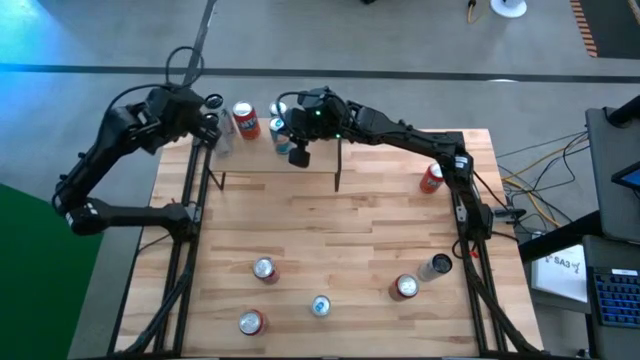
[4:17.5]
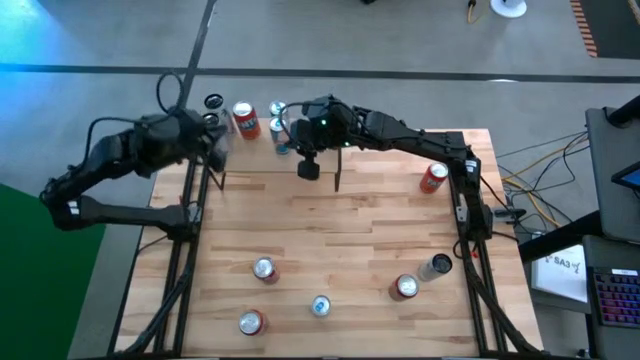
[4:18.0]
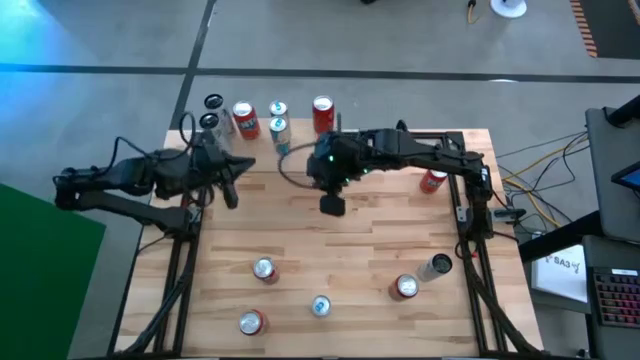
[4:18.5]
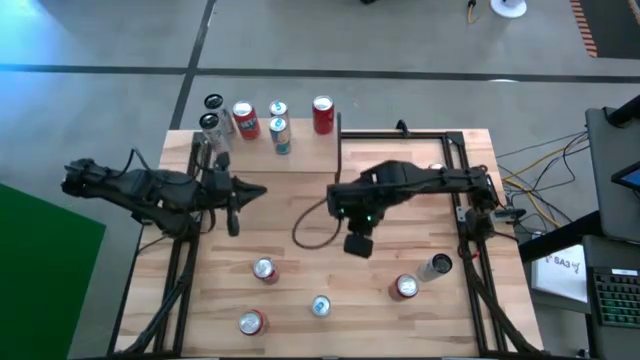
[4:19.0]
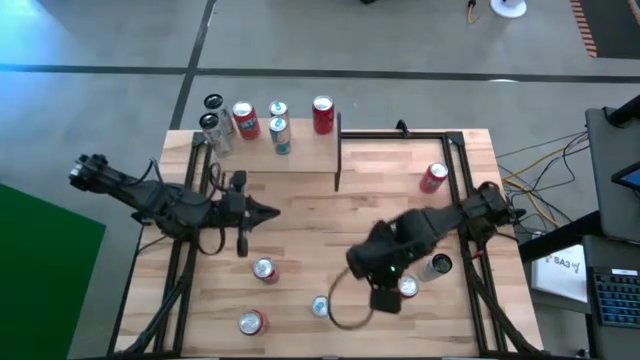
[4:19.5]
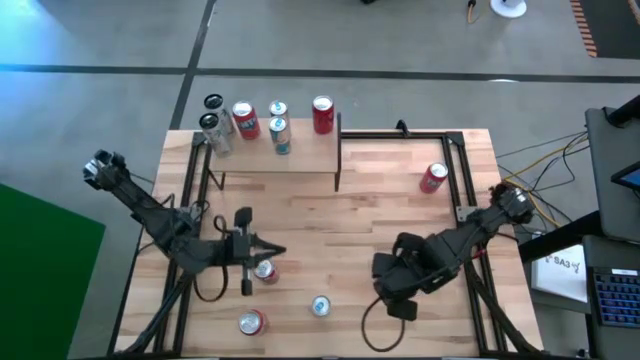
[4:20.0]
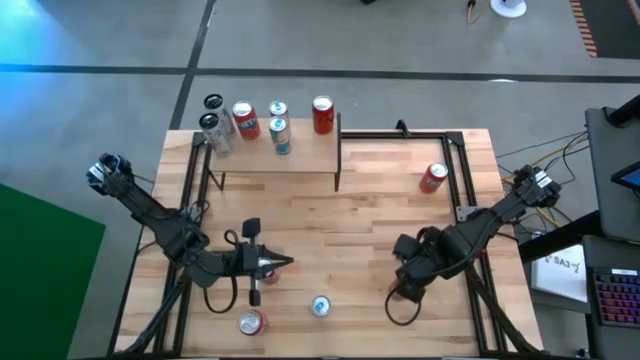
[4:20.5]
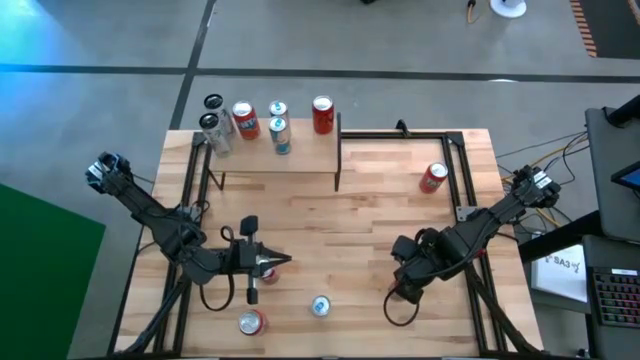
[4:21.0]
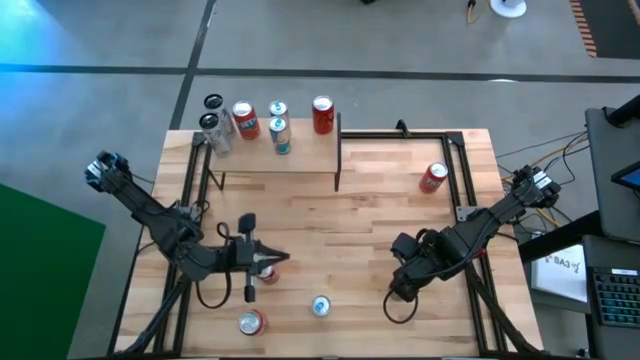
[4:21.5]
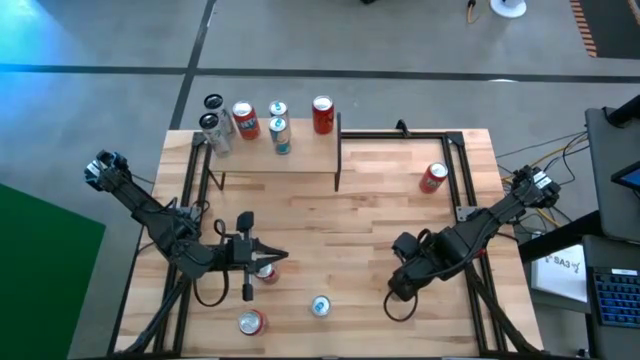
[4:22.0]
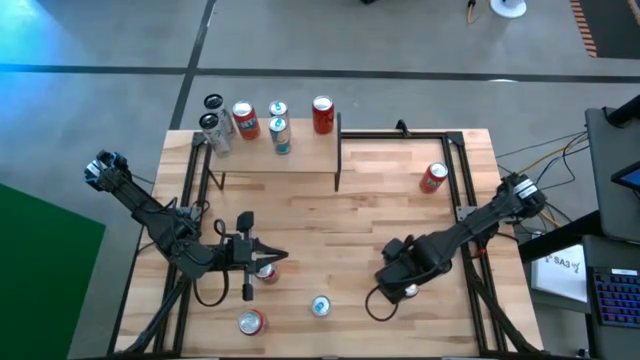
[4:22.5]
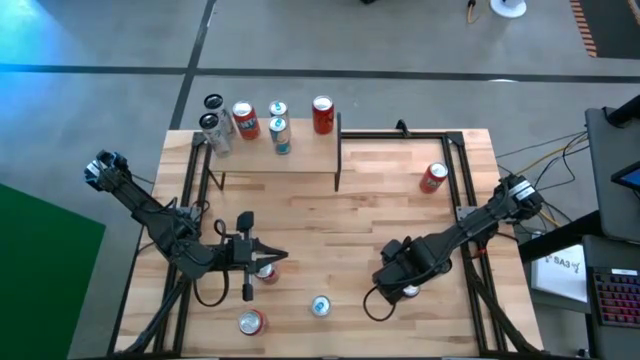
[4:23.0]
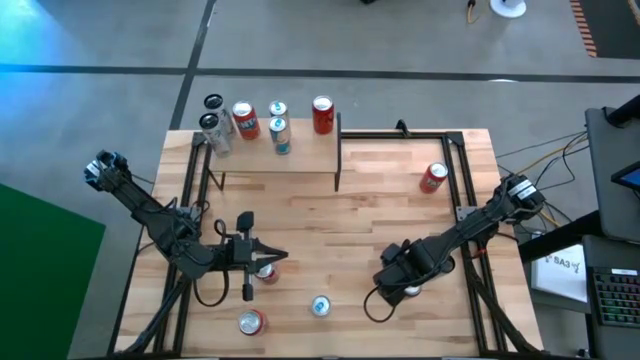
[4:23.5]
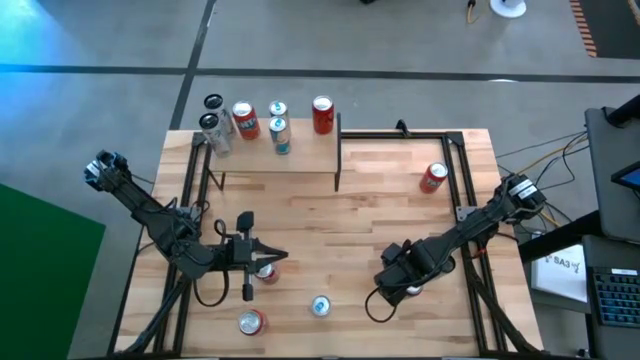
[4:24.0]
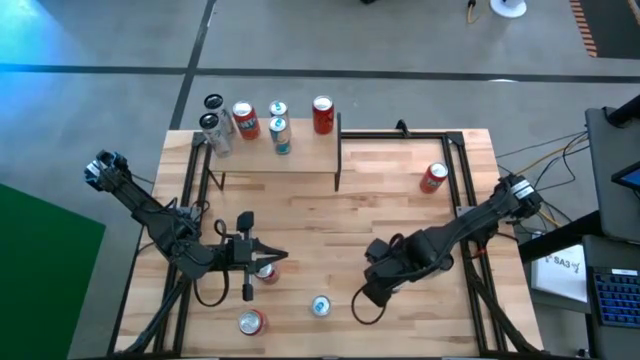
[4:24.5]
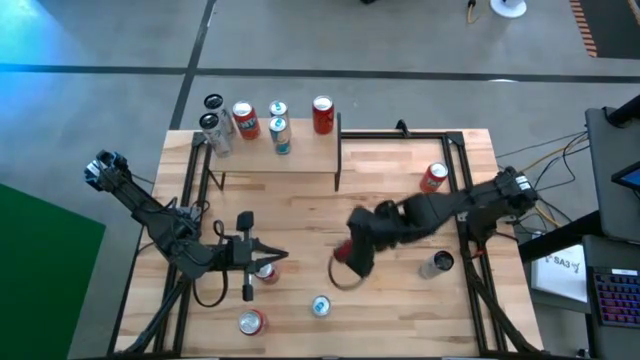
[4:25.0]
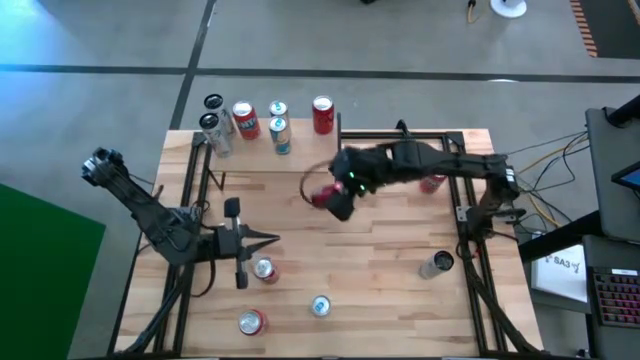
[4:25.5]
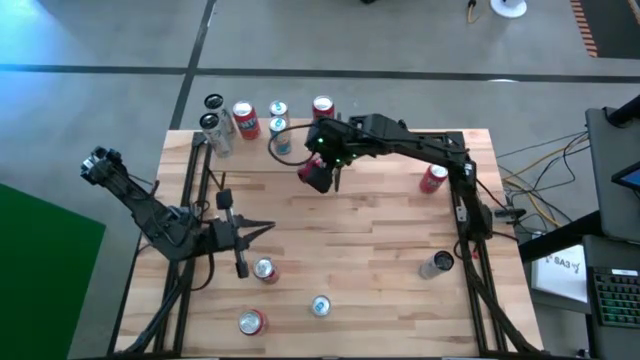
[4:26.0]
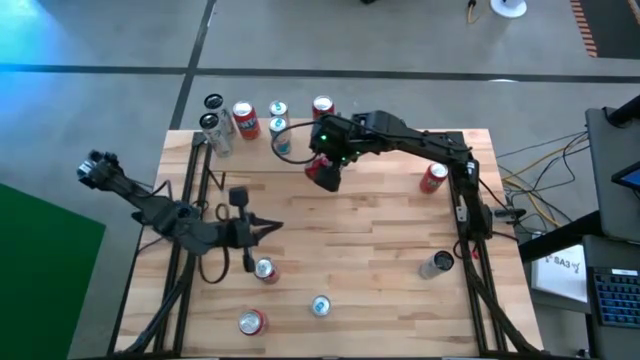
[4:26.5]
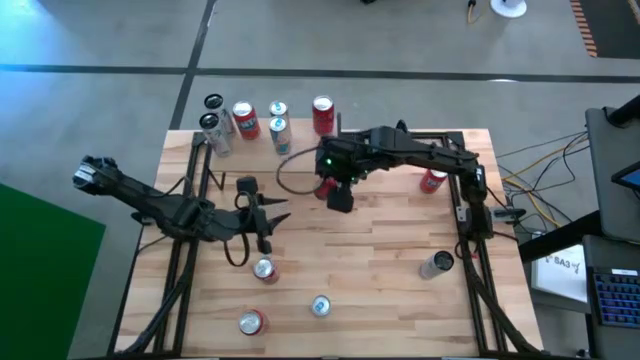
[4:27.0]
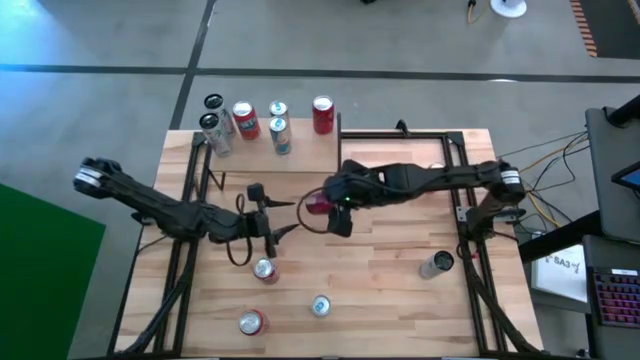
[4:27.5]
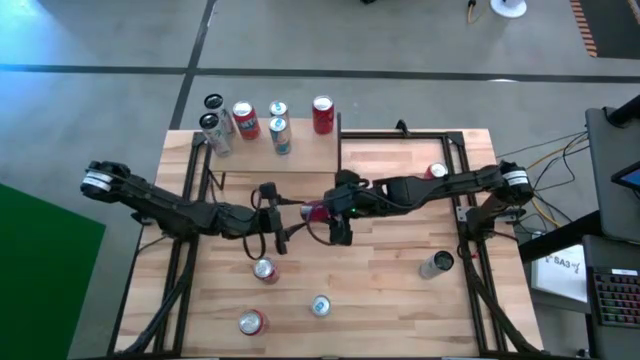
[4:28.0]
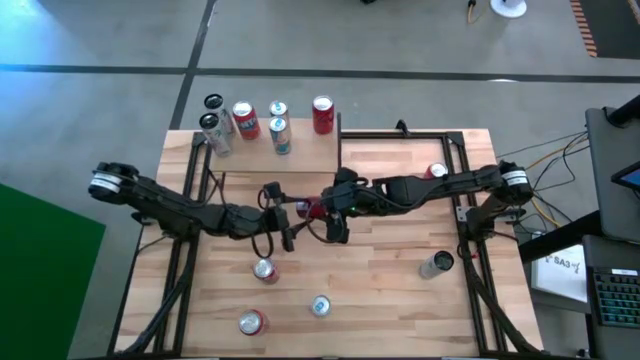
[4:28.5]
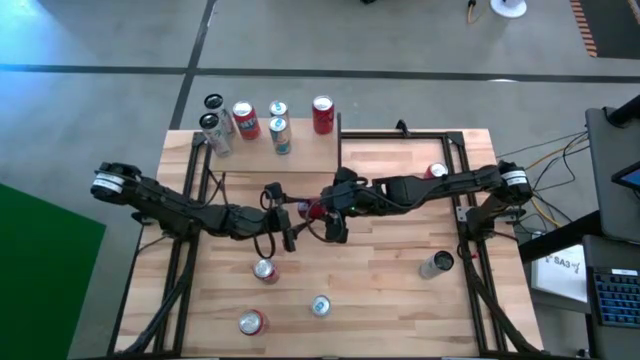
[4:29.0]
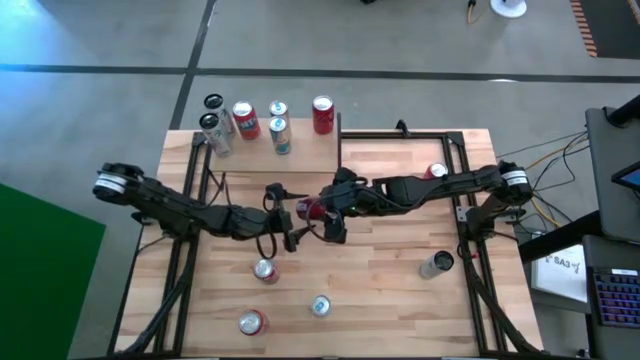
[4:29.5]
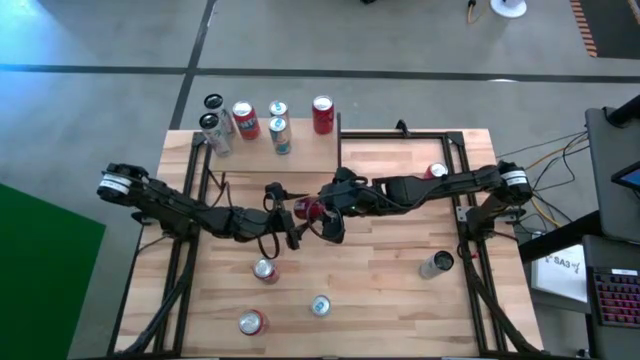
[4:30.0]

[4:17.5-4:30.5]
Task: Place canned beverage on shelf
Put the red black soda can on the shelf aligned with the other red black soda can

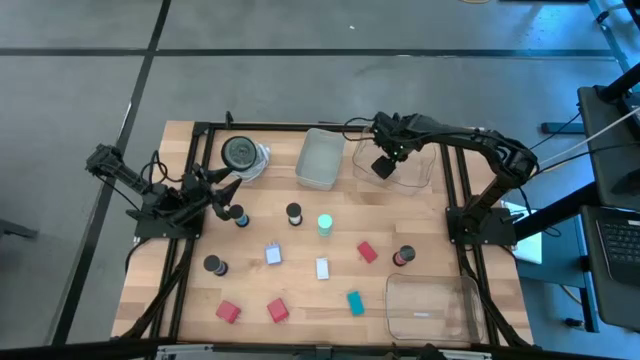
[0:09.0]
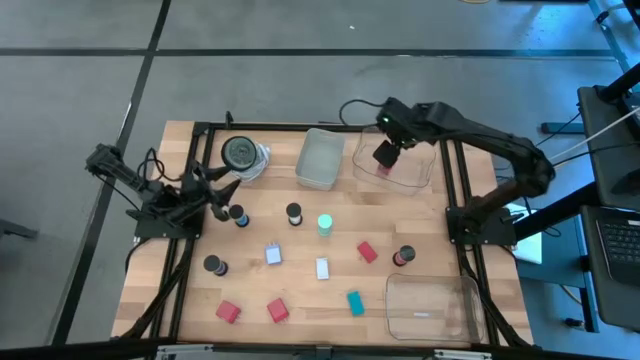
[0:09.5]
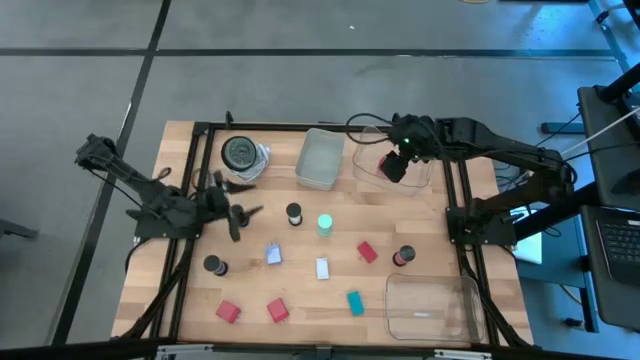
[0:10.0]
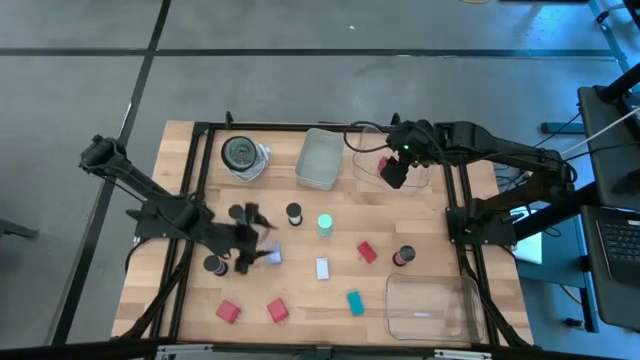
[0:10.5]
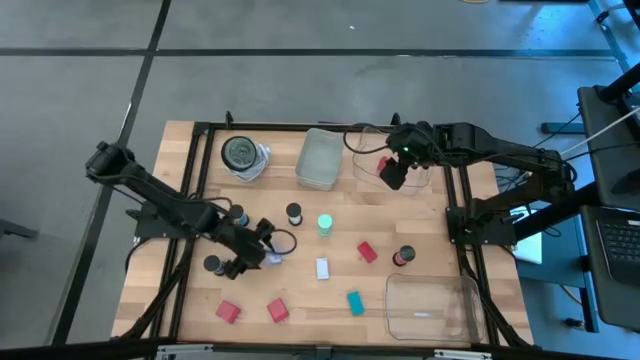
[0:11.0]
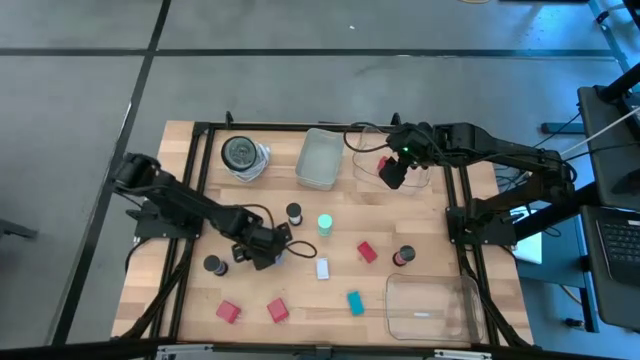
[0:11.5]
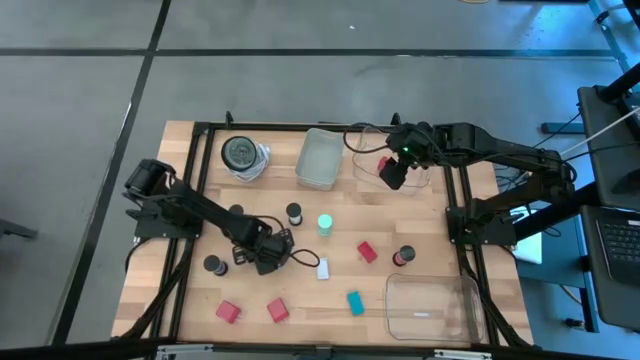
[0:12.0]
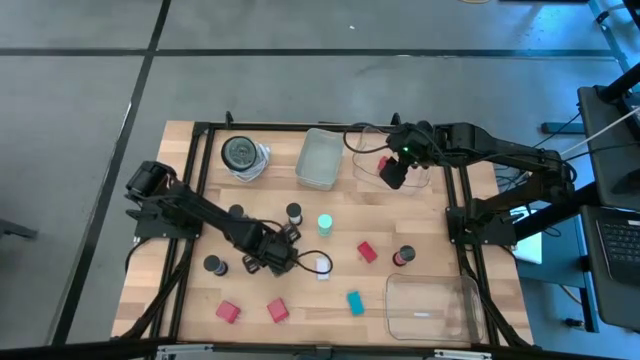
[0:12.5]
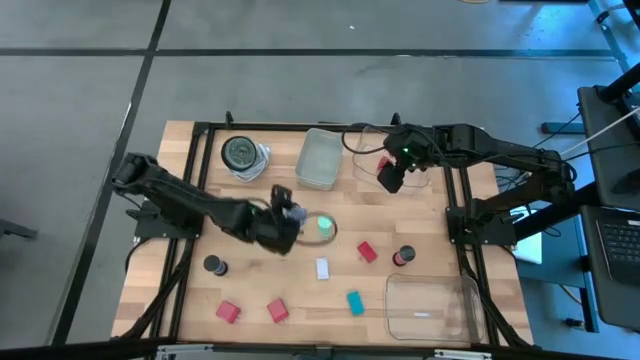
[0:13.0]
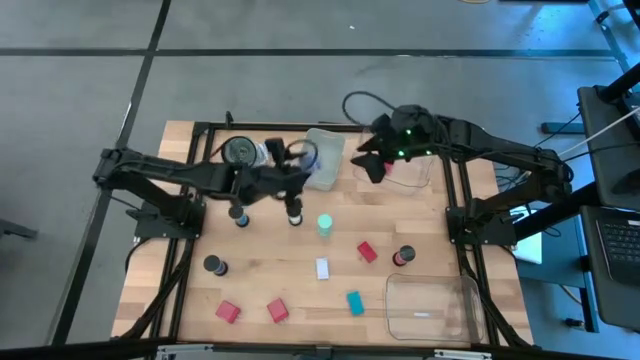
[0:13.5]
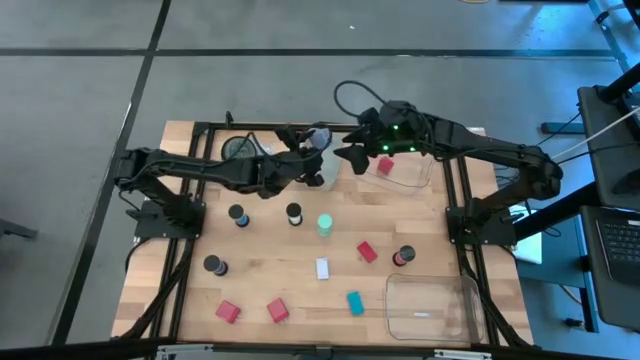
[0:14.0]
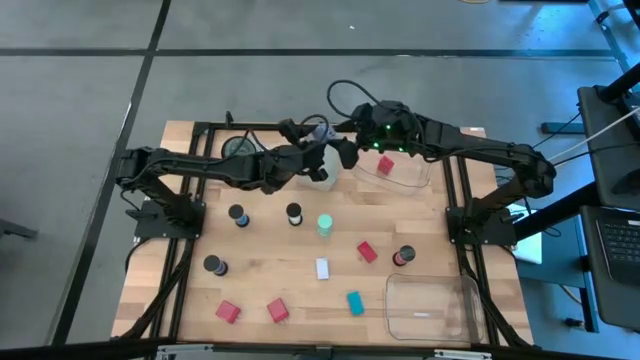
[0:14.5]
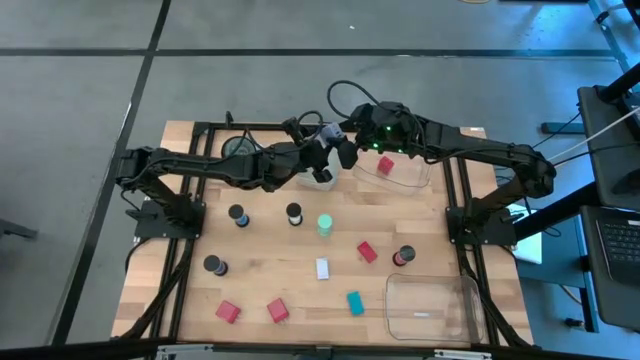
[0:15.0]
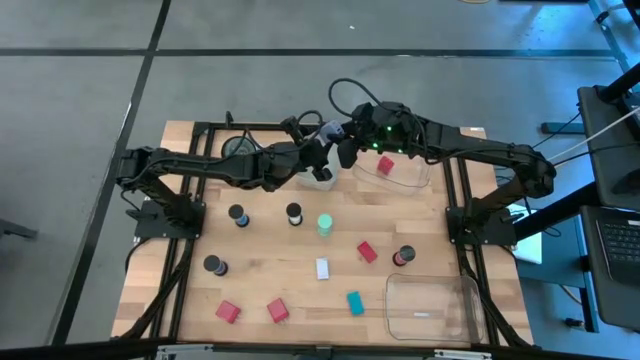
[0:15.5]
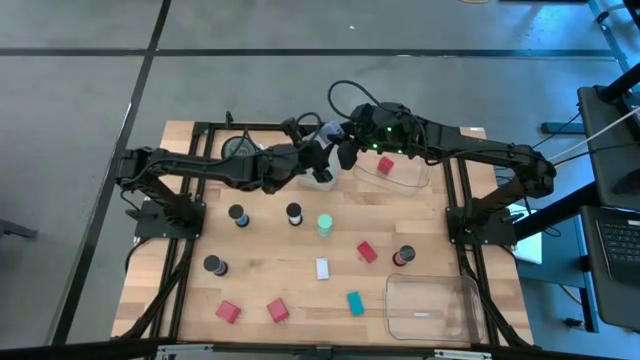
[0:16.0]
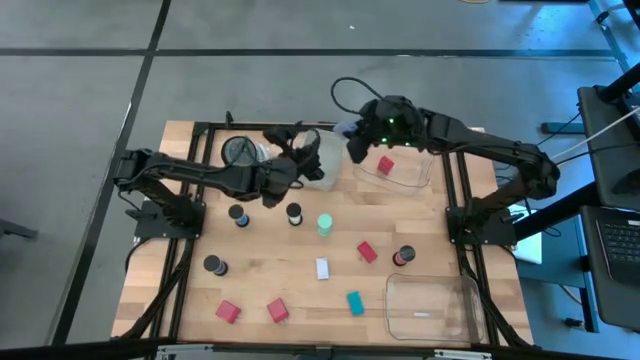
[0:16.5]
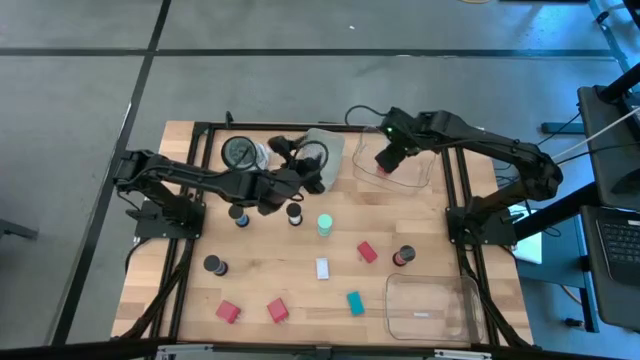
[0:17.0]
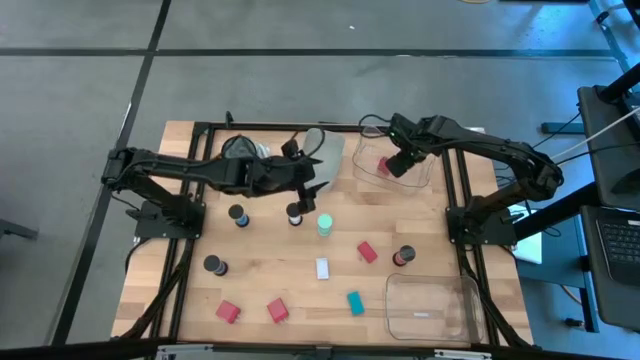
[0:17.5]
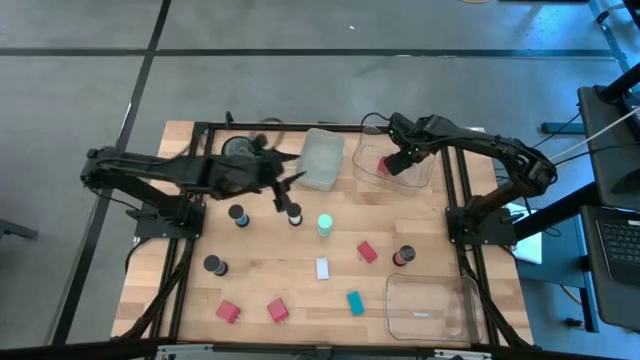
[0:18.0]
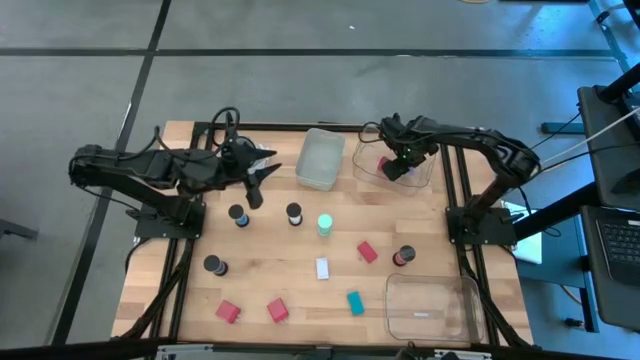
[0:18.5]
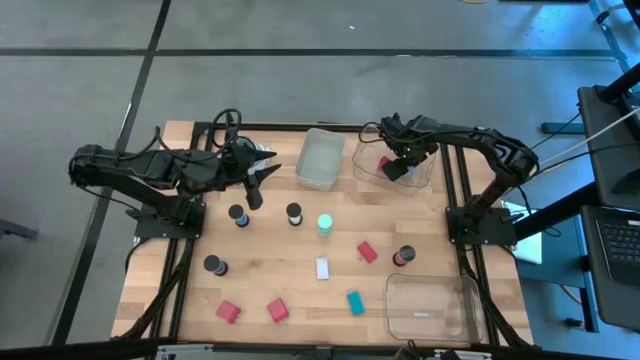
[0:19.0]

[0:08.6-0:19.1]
Task: Pick & Place Office items
Put the blue charger adapter into the top transparent bin
